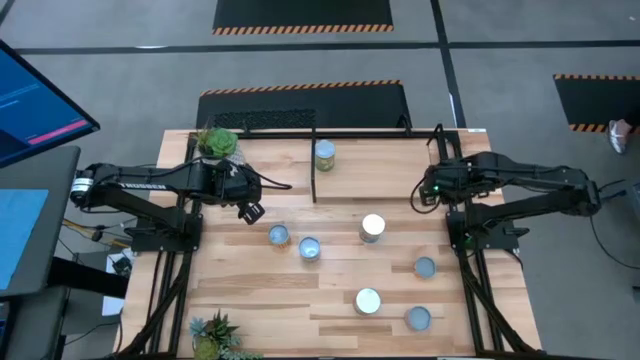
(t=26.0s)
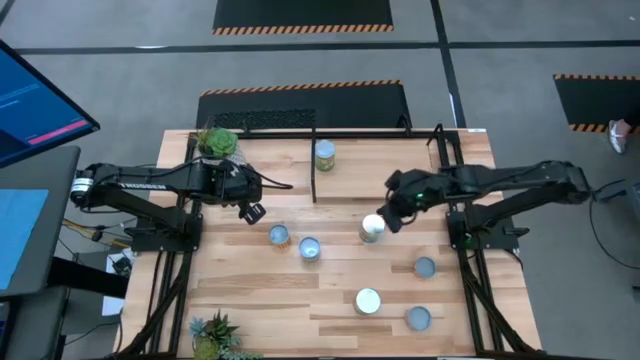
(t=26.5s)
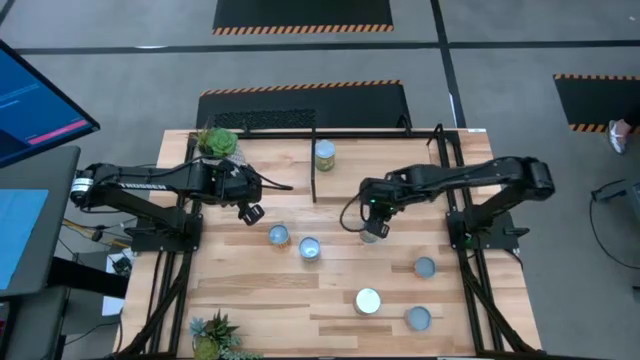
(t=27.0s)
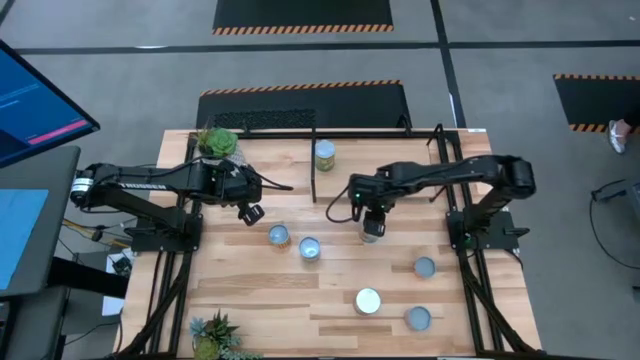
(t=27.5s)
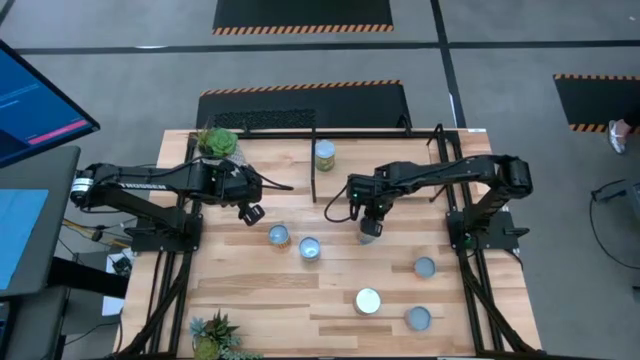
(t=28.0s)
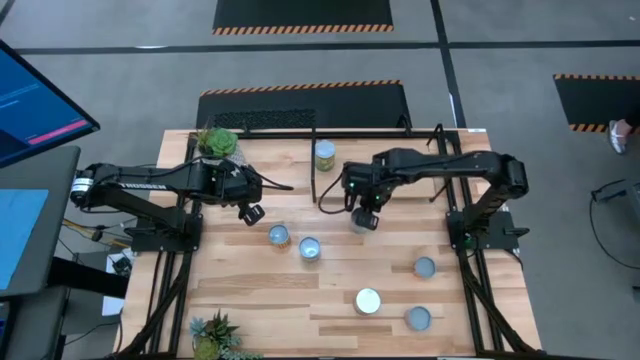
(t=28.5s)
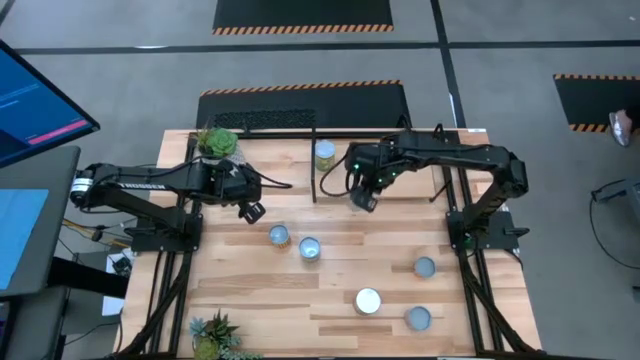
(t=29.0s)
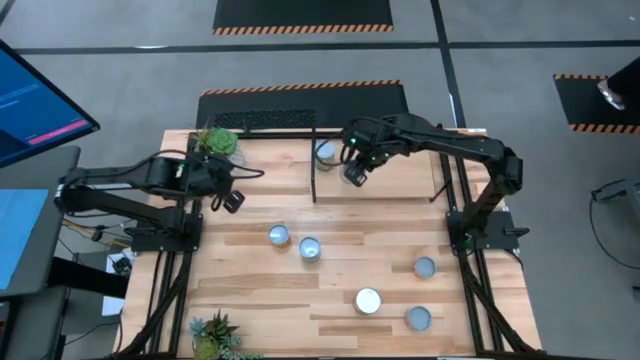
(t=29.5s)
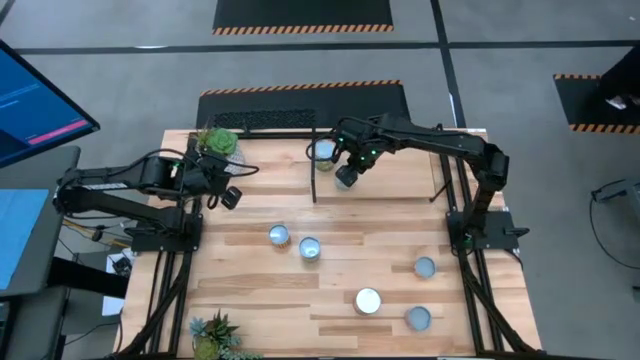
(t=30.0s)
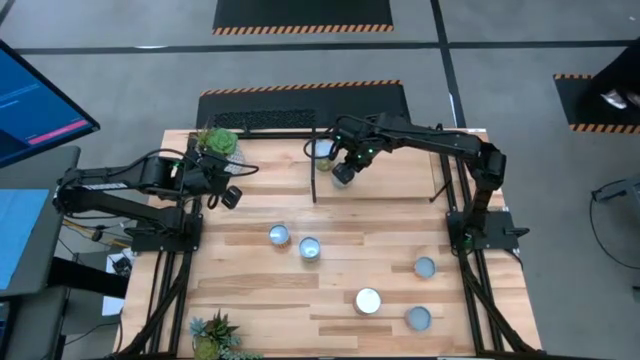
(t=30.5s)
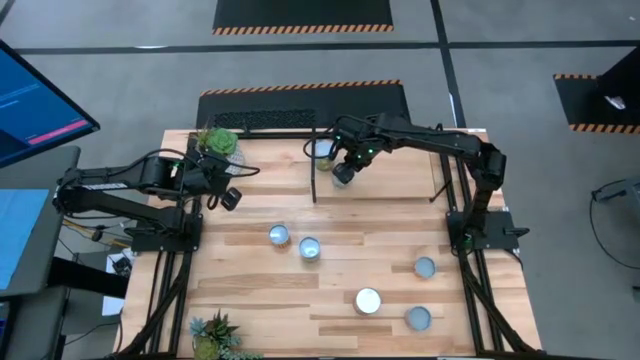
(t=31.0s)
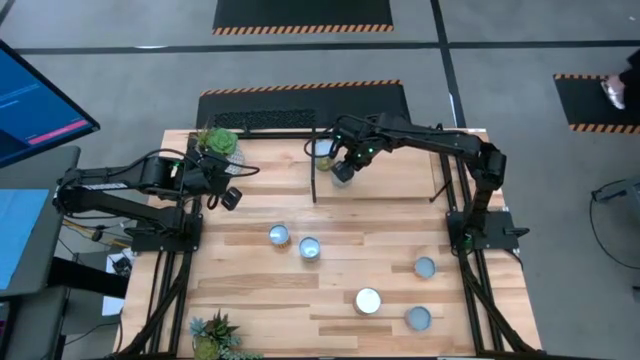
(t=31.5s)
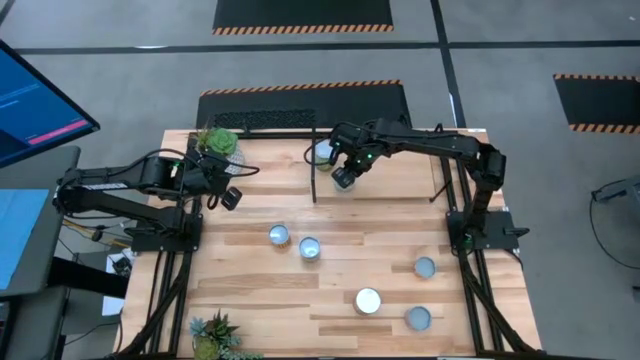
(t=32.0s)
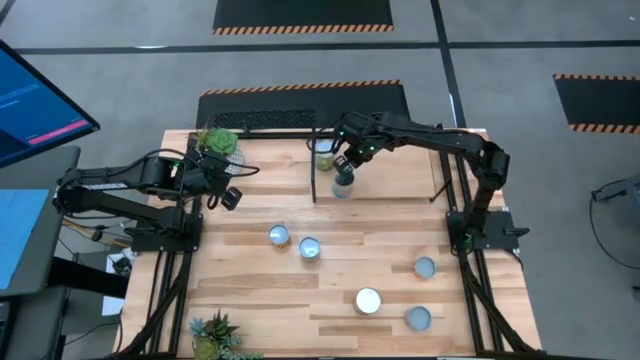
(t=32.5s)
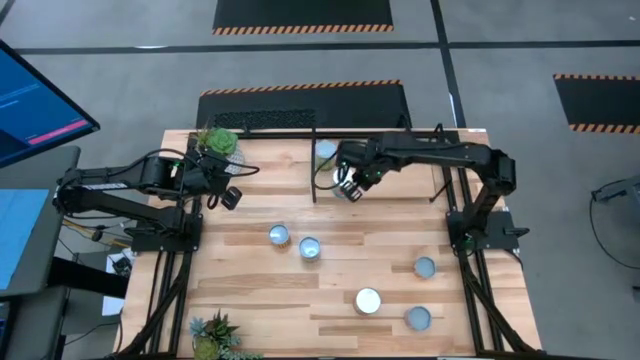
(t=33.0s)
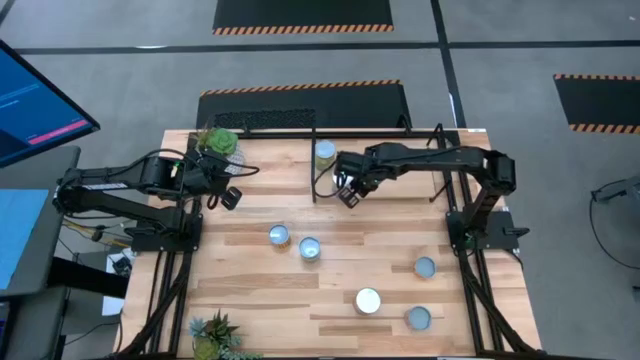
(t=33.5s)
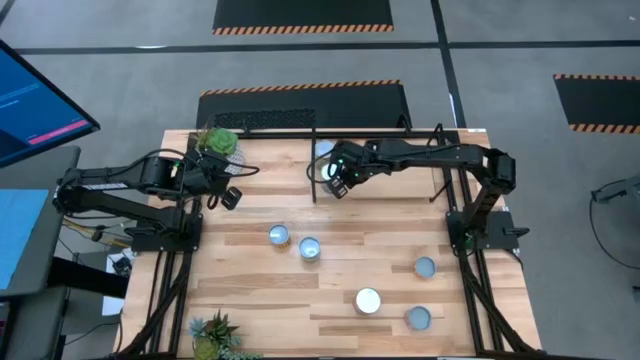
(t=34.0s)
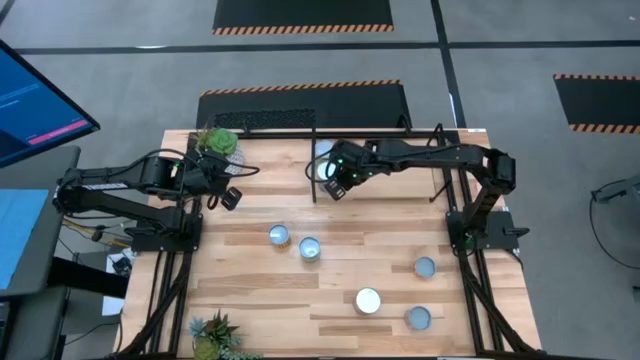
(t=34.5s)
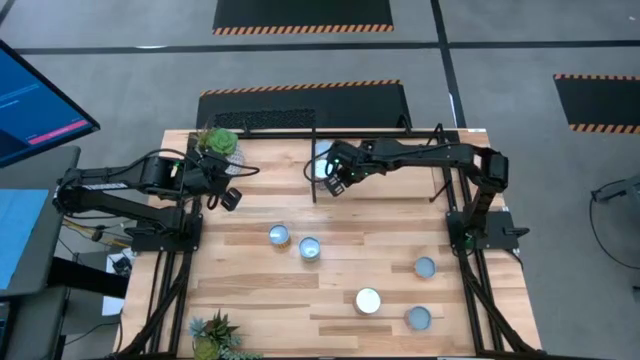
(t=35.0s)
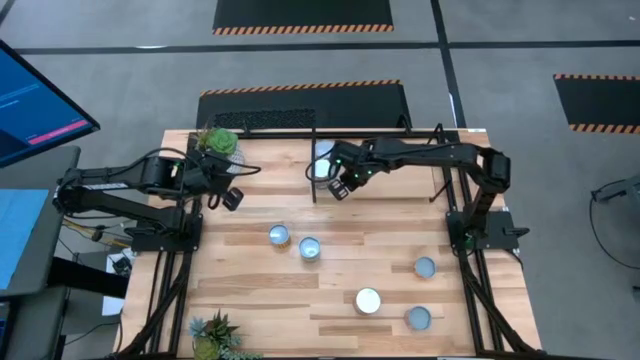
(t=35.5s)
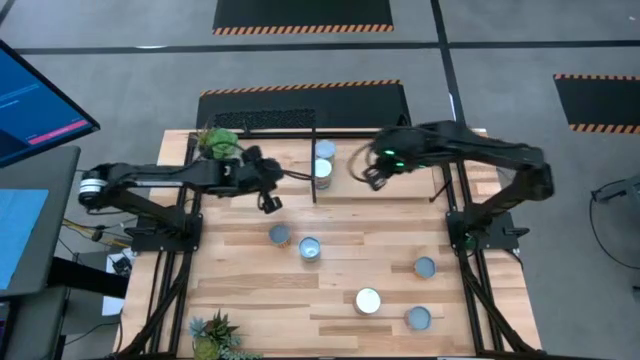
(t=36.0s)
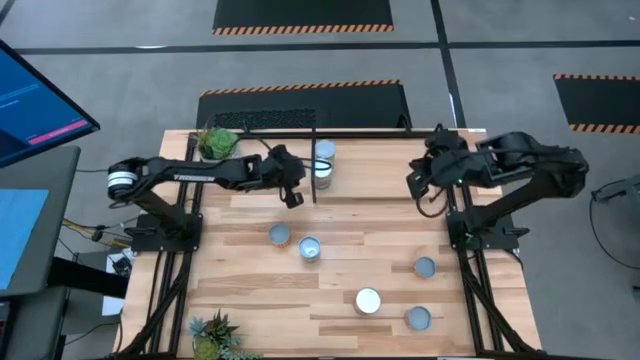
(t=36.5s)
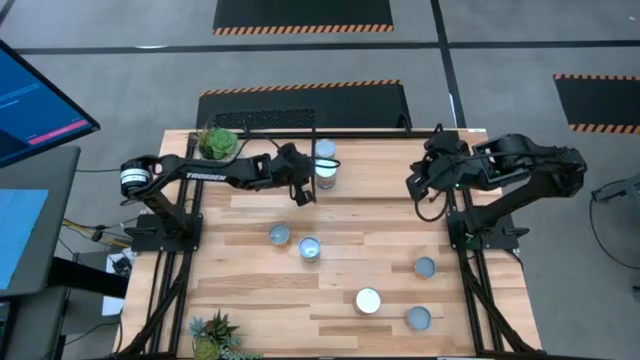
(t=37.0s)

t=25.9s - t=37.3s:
Task: Pick and place cans onto a shelf
Put the canned tomatoes on the shelf

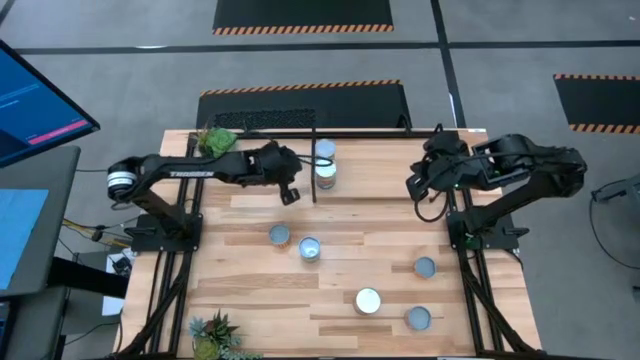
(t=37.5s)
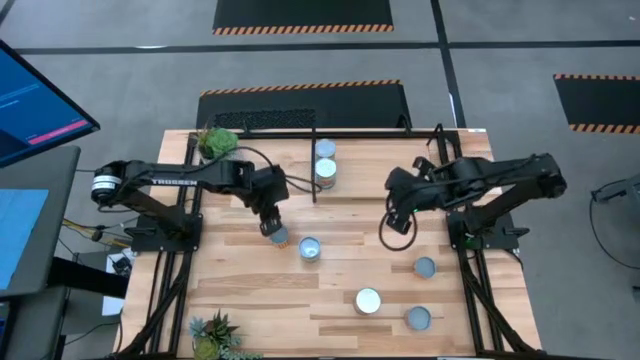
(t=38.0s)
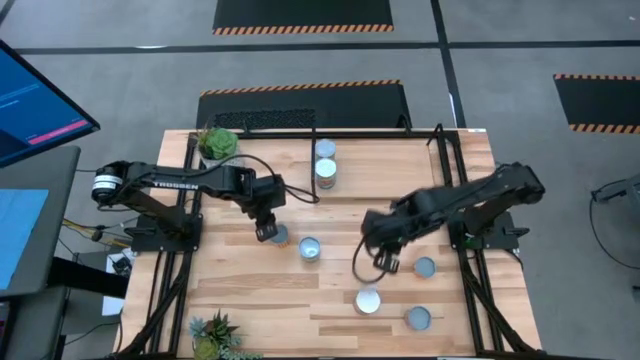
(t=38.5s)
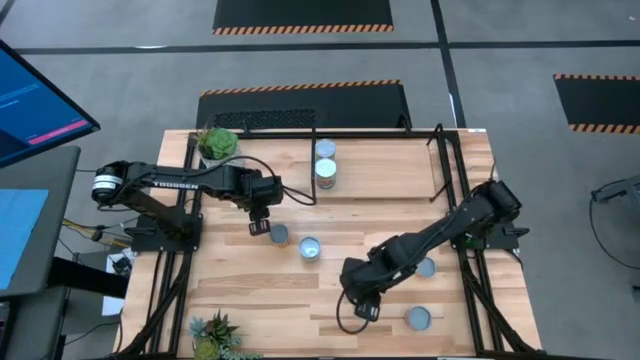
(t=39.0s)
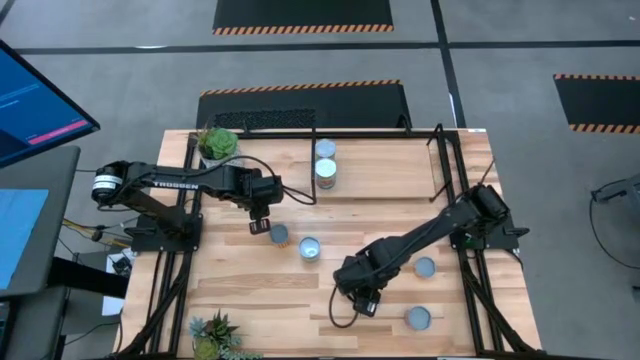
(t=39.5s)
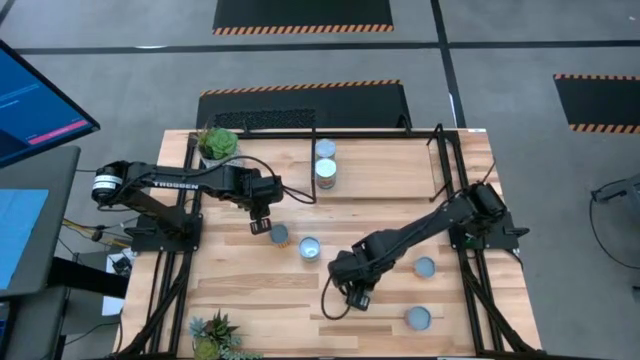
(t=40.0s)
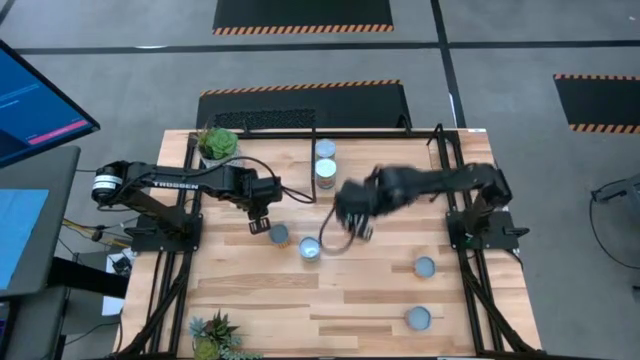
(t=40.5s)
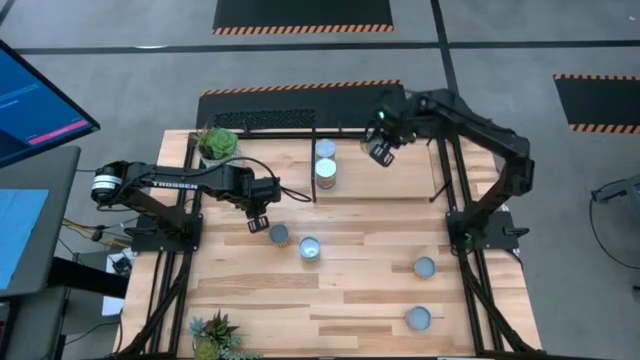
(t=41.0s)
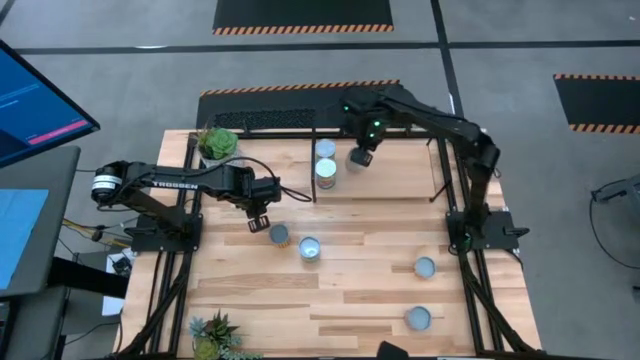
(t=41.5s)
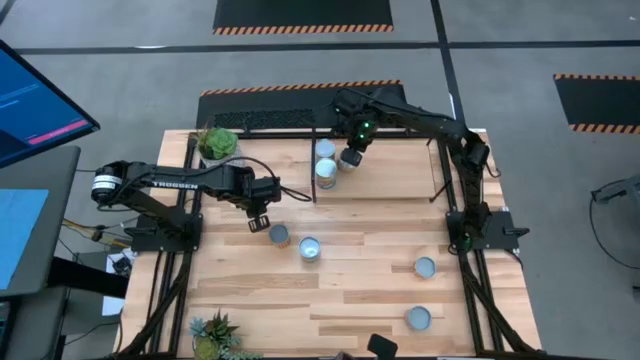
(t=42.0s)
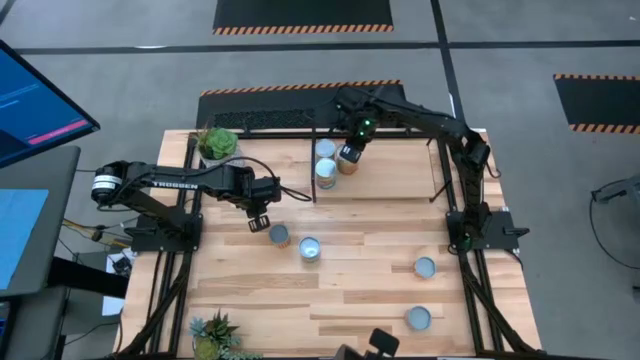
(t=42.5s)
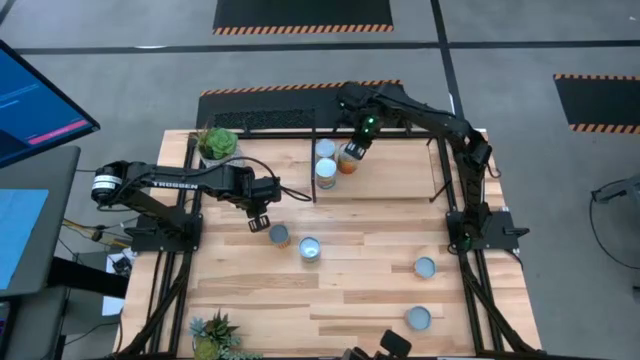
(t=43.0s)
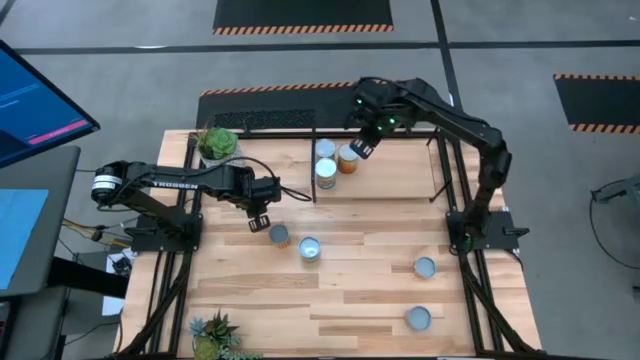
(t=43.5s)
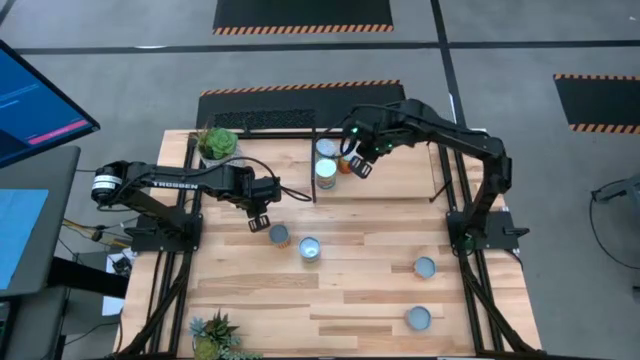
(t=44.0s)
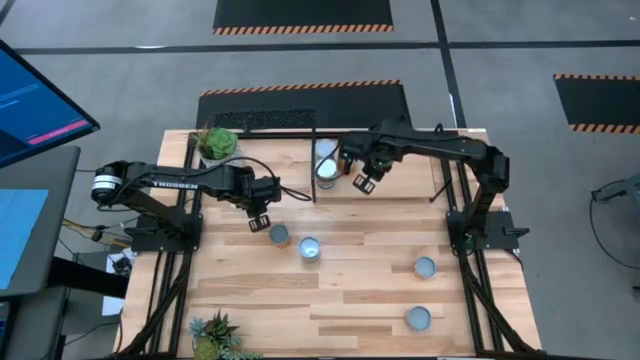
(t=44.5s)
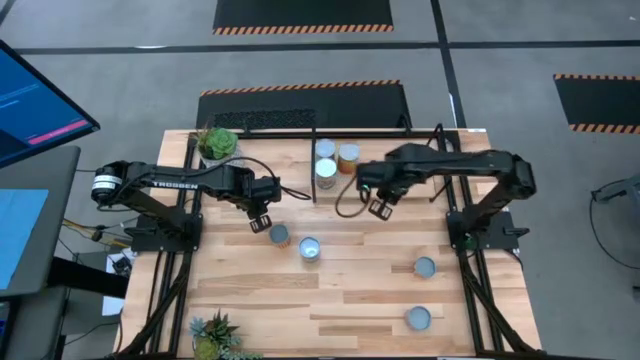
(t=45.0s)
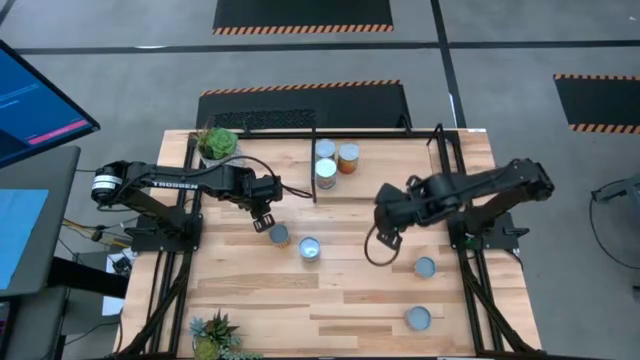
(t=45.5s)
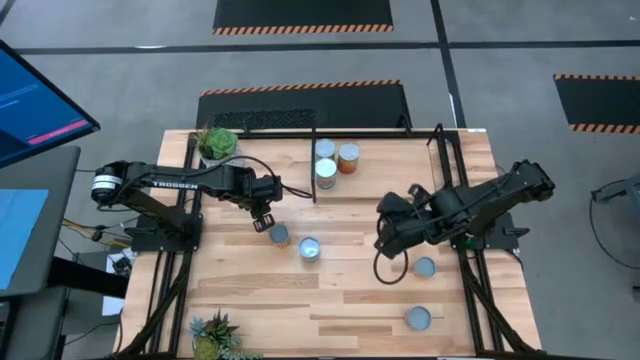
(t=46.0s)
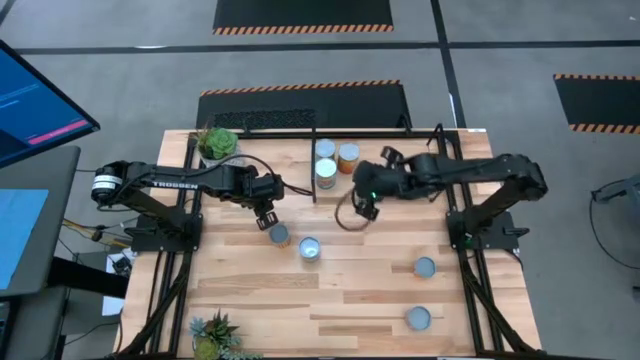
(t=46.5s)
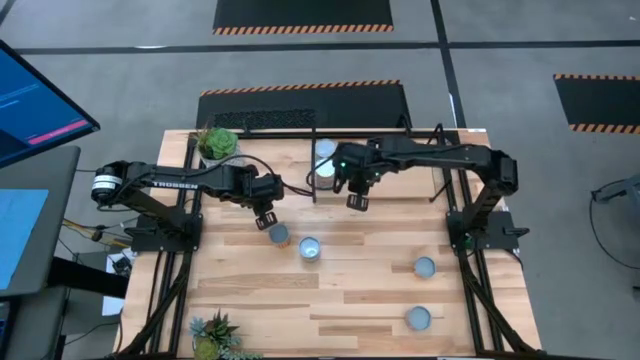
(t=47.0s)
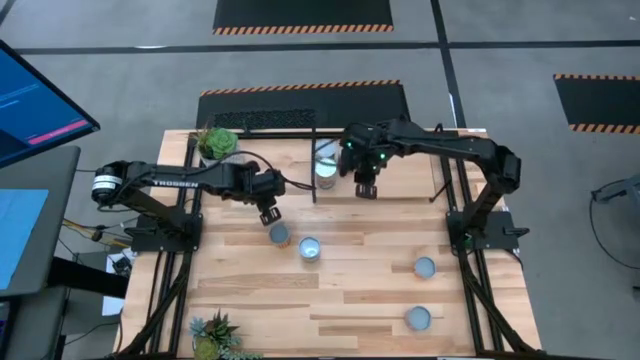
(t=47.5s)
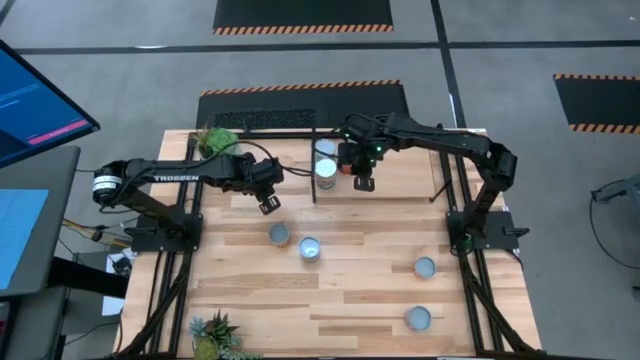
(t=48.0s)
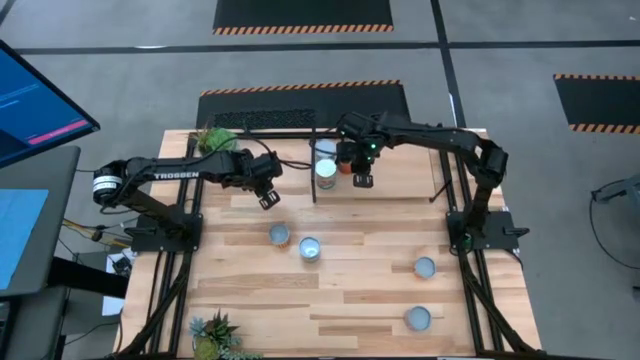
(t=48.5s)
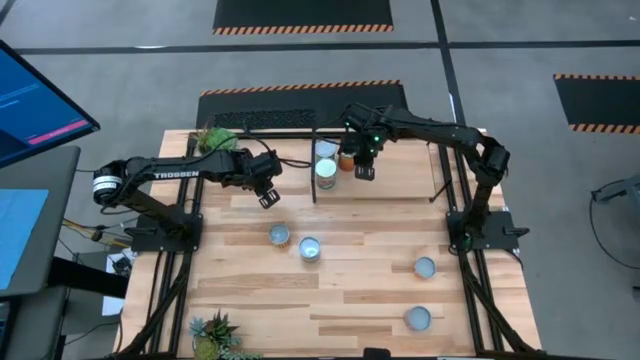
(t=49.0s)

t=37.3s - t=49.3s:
Put the canned green beans on the shelf
